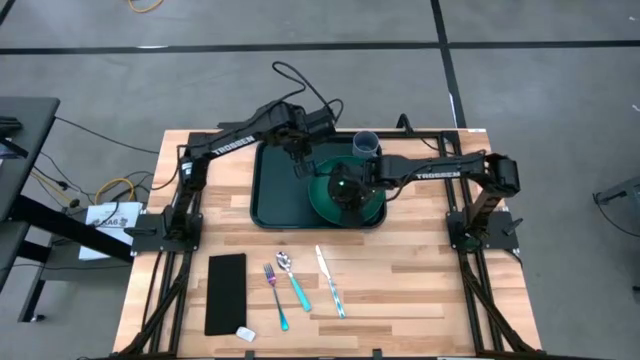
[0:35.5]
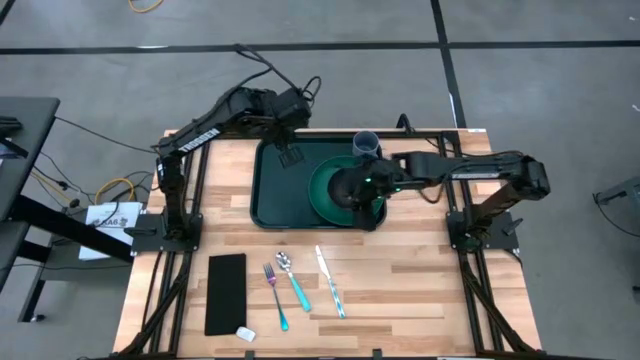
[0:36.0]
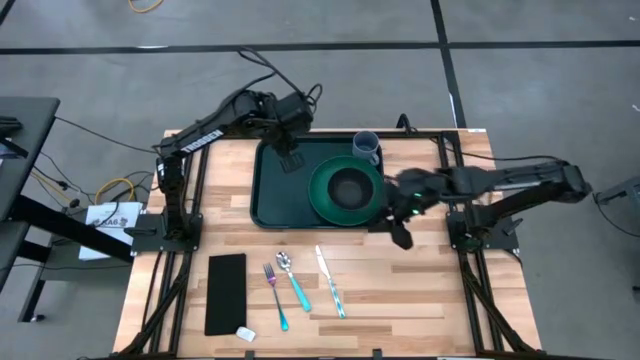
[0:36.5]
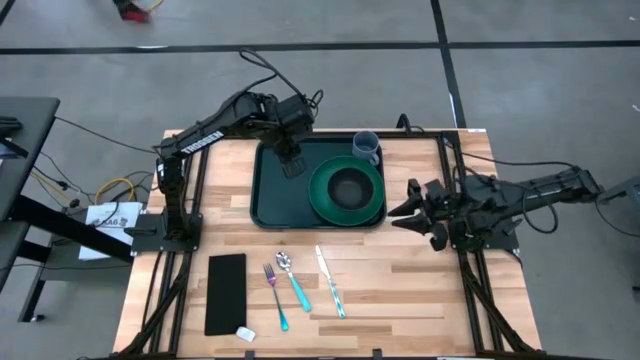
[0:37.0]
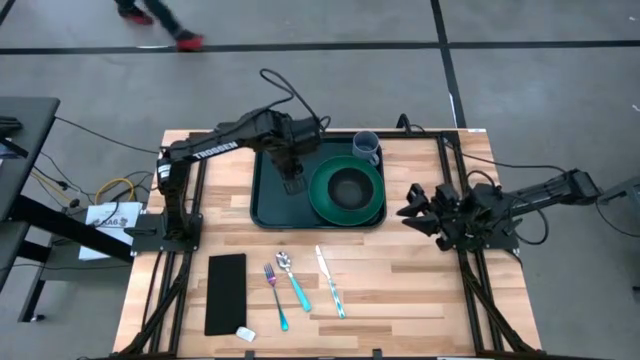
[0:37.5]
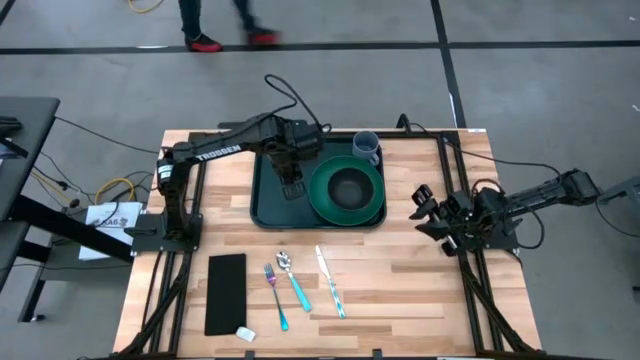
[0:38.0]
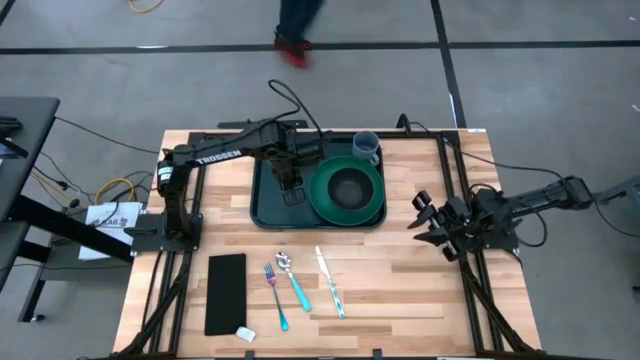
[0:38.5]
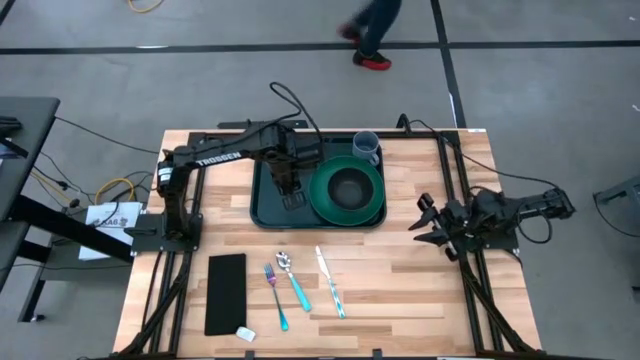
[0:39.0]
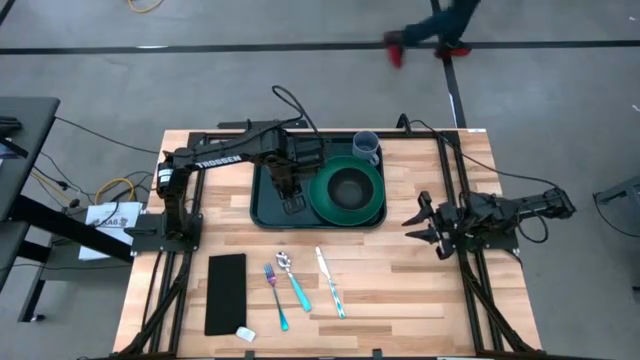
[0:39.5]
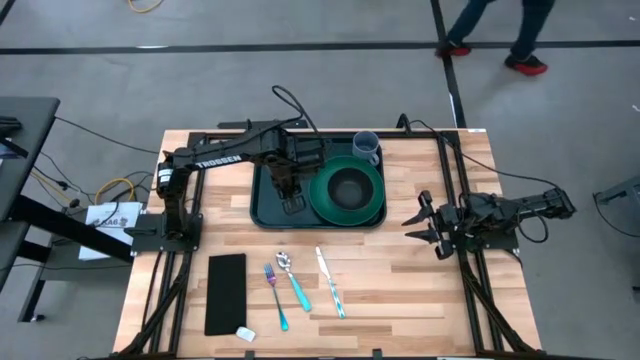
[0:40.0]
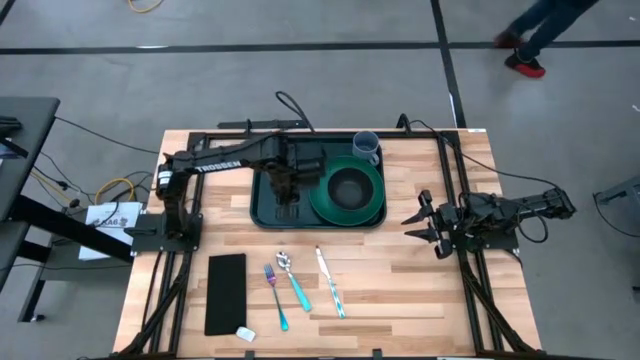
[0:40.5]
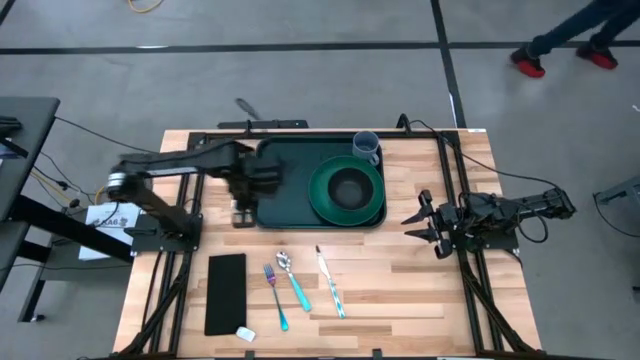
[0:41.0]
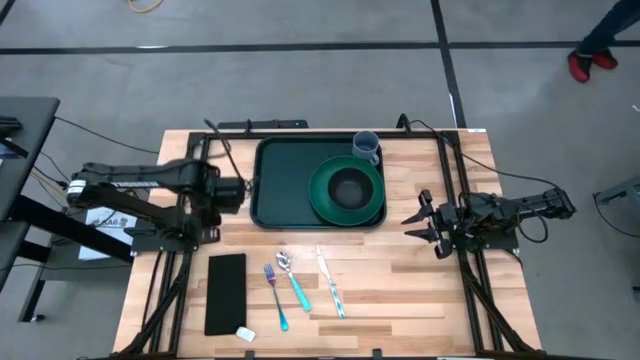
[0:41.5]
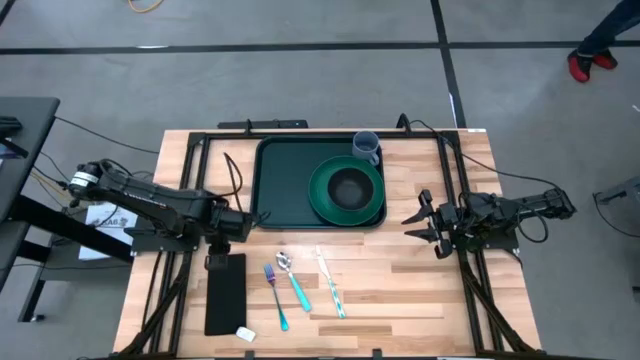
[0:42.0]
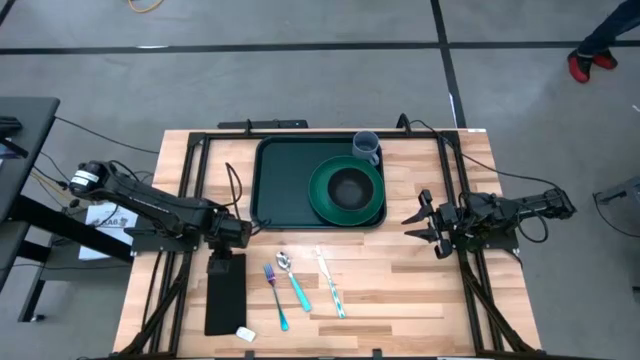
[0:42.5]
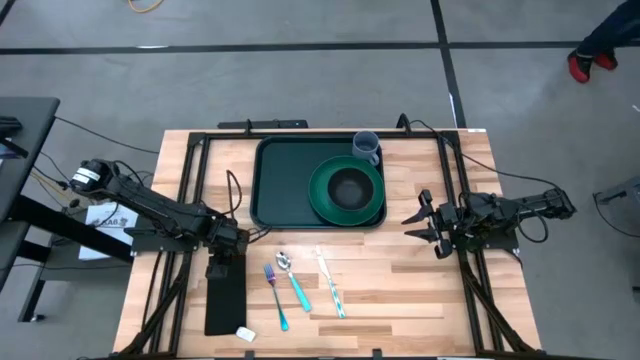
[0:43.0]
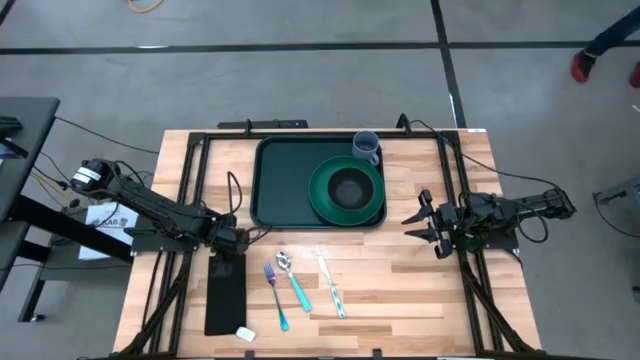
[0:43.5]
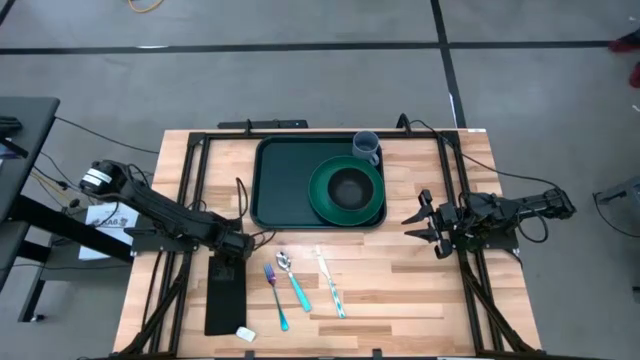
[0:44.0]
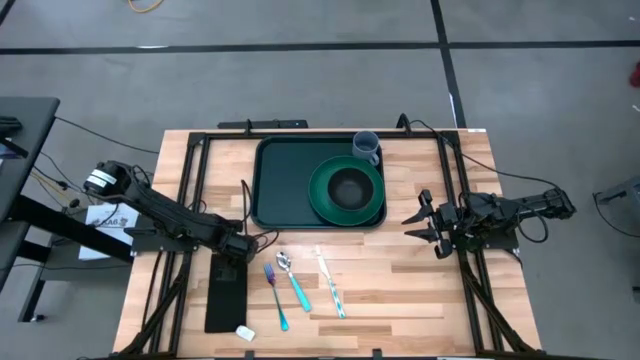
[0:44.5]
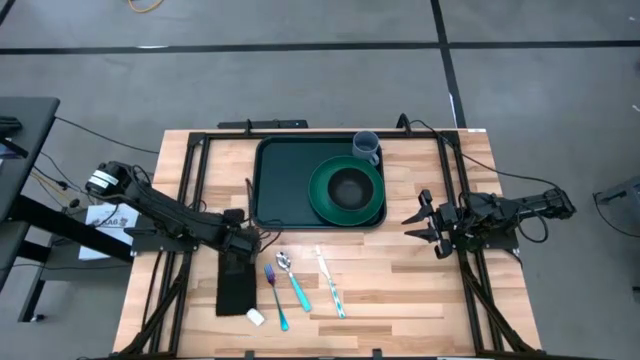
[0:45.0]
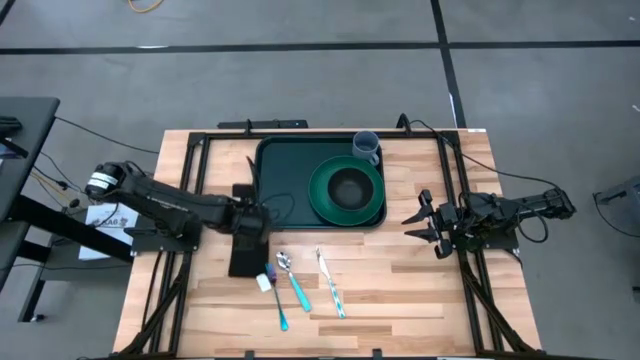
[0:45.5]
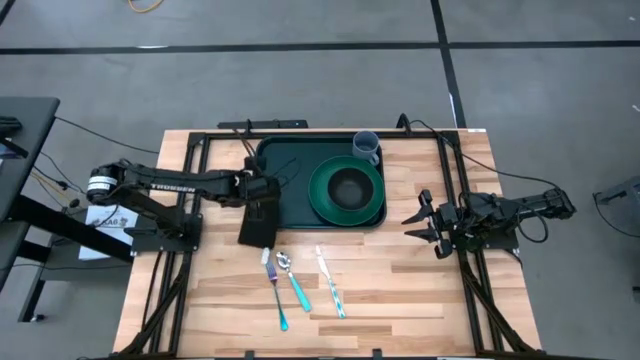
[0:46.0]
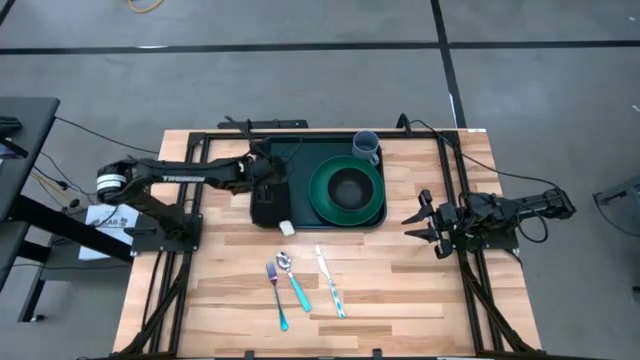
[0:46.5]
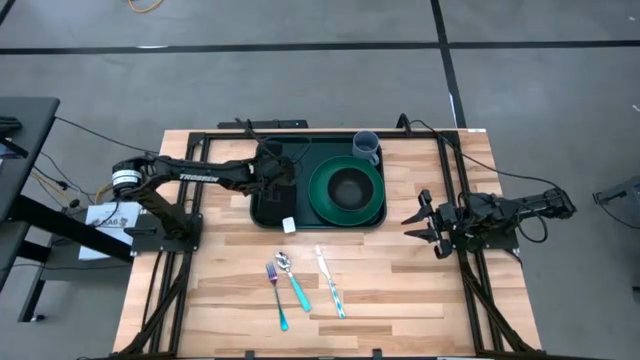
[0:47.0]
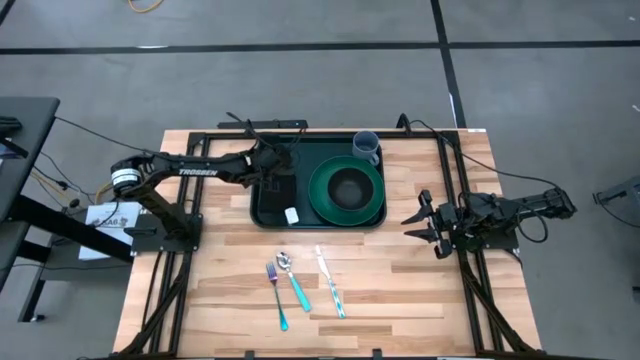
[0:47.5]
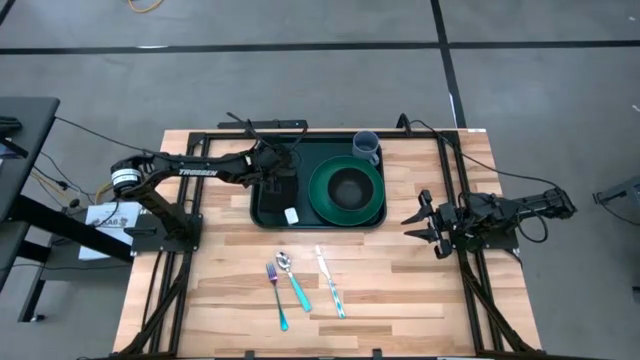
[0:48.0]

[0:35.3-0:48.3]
Task: Set up tray
Put the black napkin on the black tray to the left of the green plate

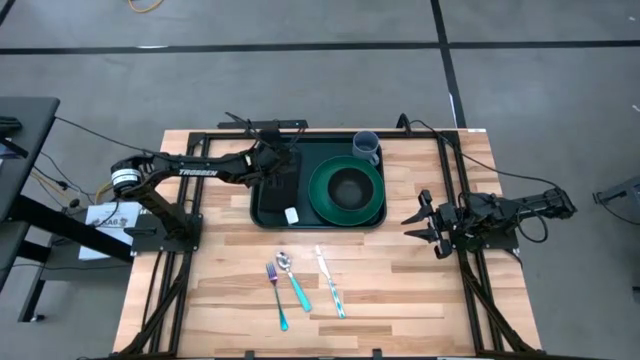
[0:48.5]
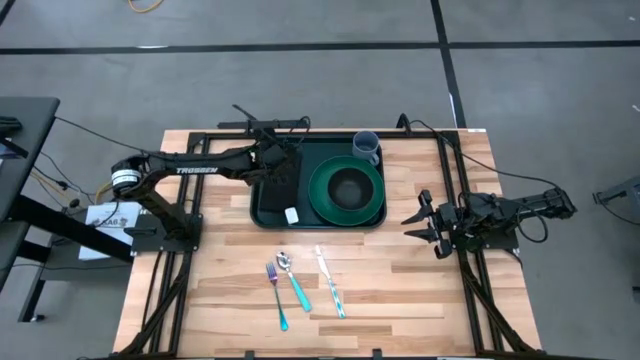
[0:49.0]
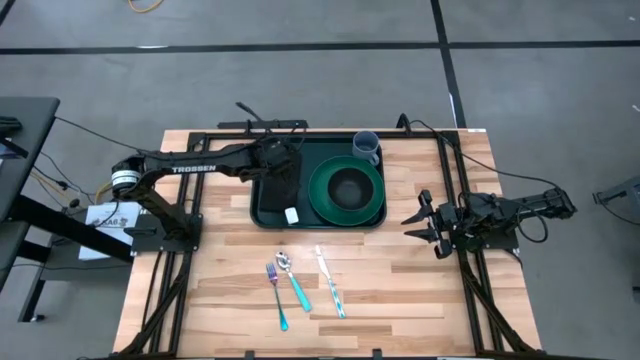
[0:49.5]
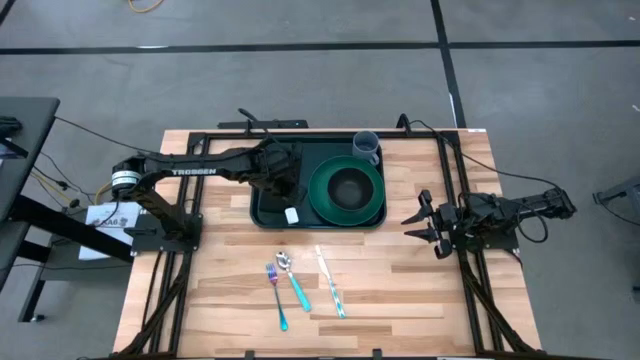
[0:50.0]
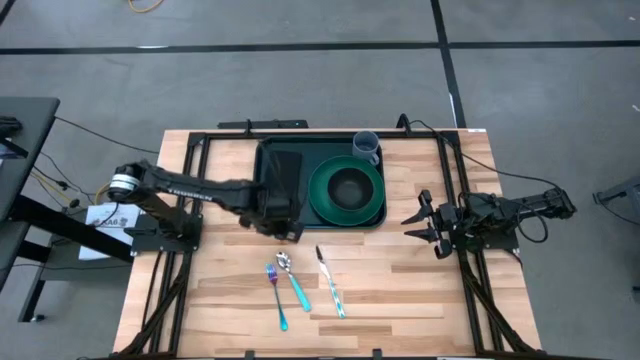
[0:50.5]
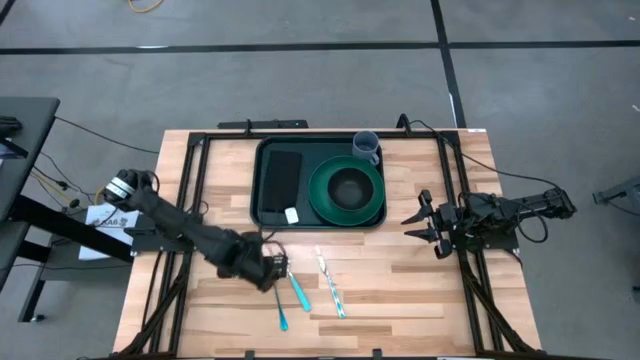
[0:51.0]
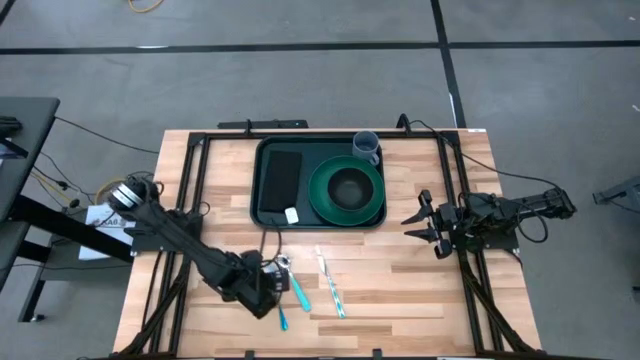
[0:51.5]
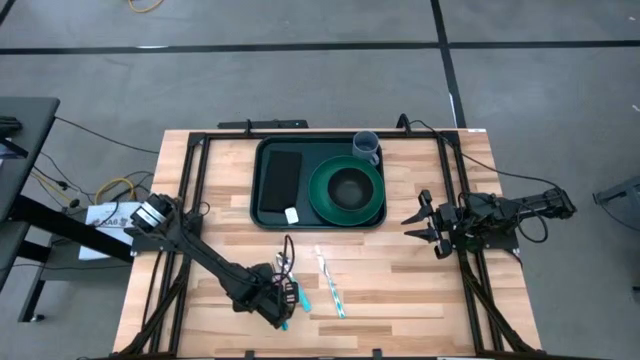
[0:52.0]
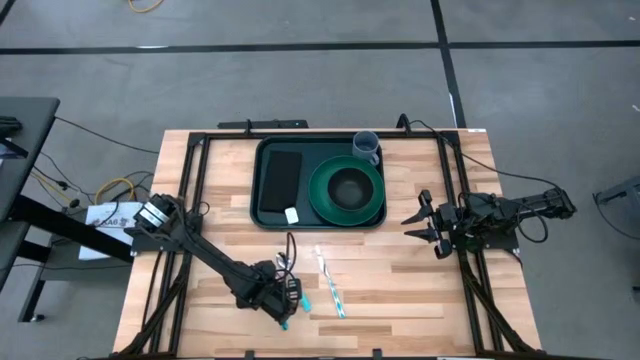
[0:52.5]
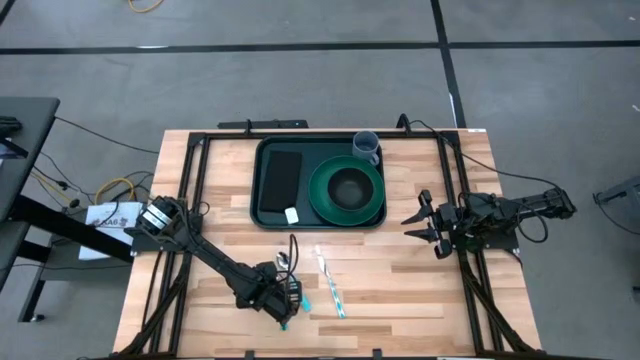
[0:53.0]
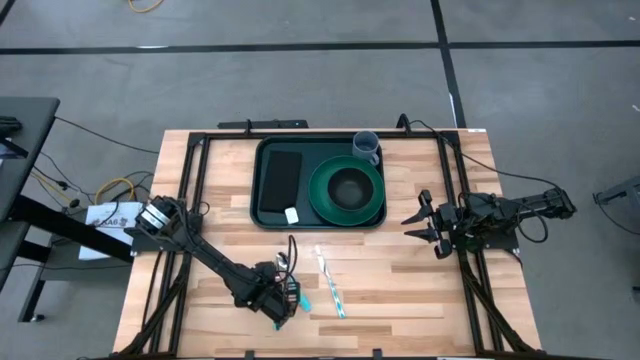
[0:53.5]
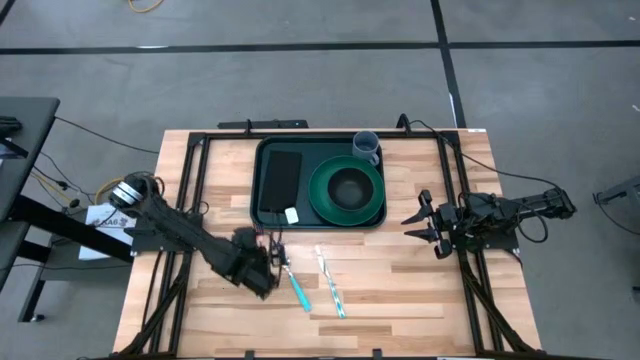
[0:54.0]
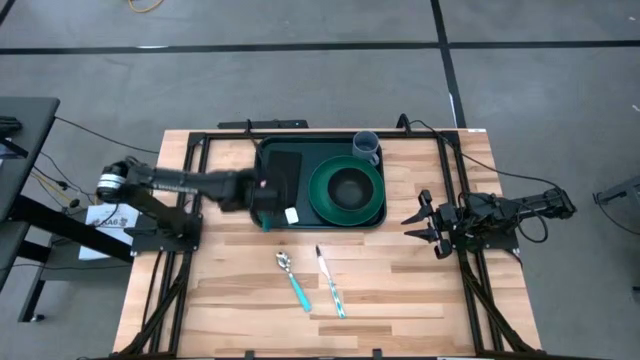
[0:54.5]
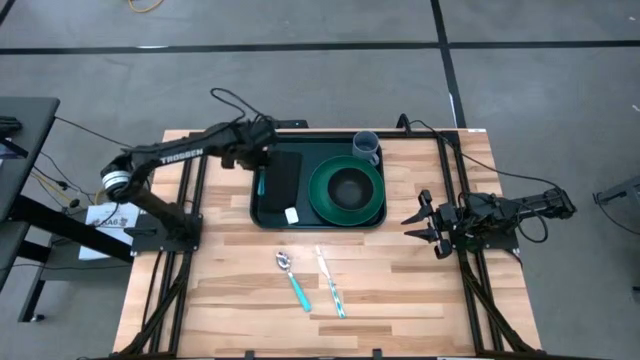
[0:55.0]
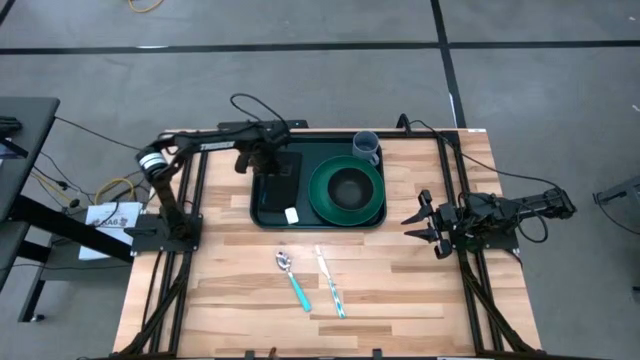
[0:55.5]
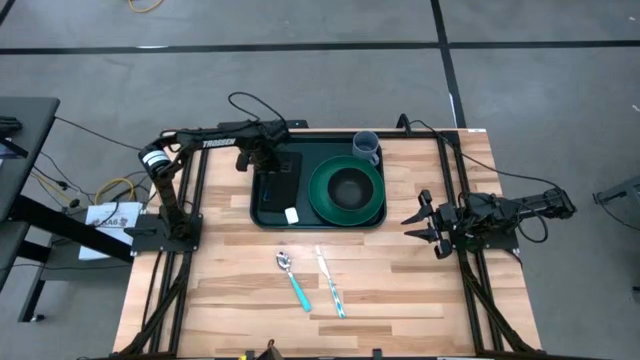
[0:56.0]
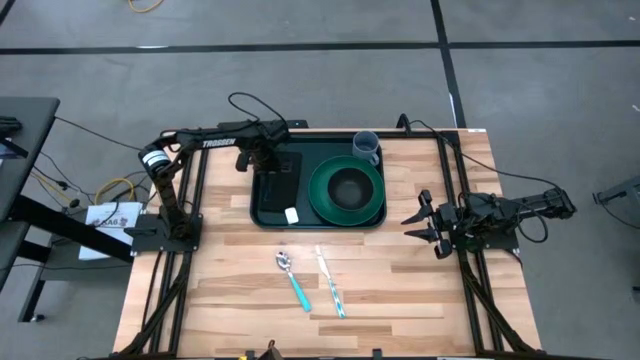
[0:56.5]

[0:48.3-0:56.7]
Put the purple fork on the black napkin
